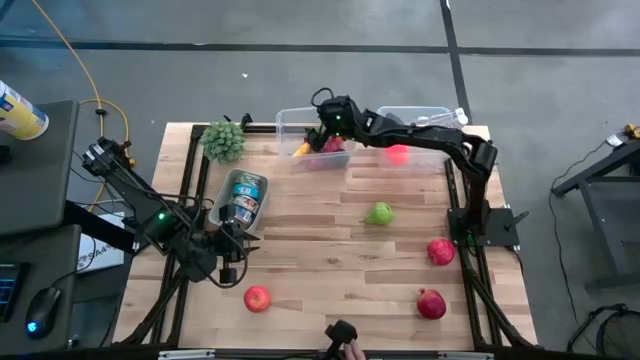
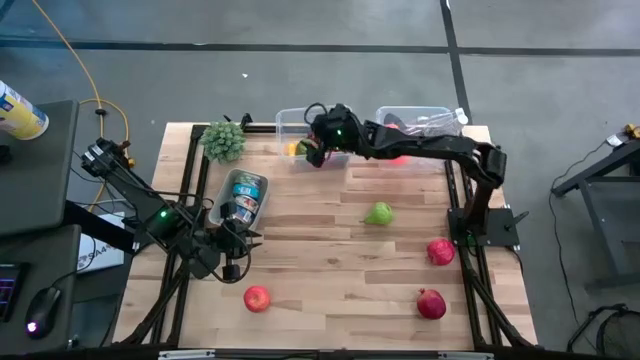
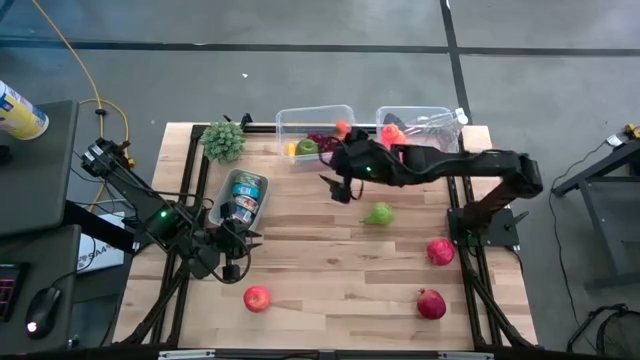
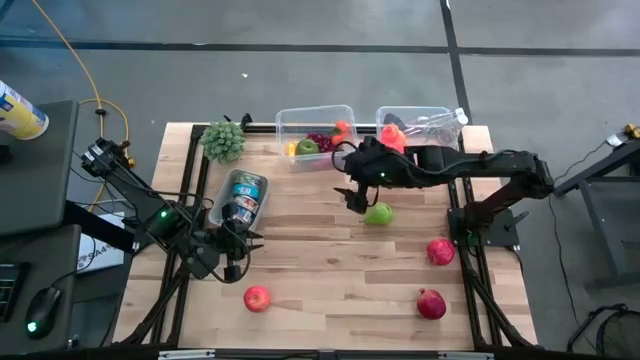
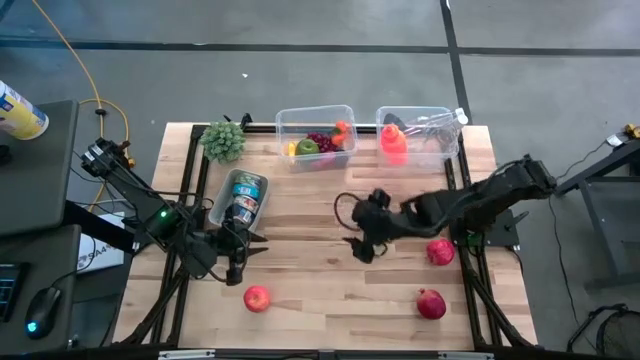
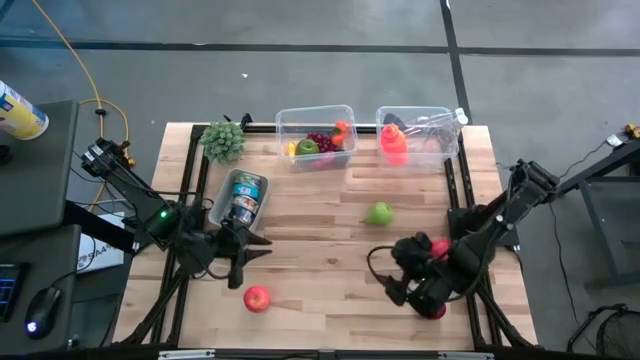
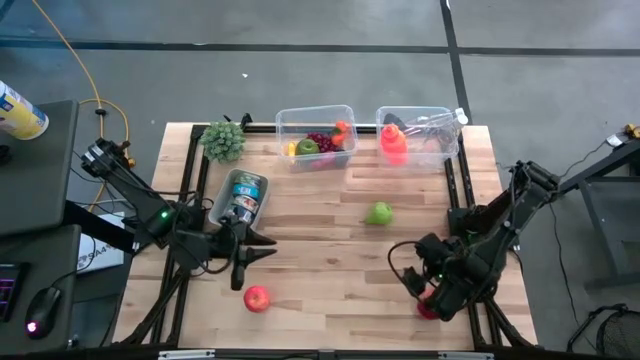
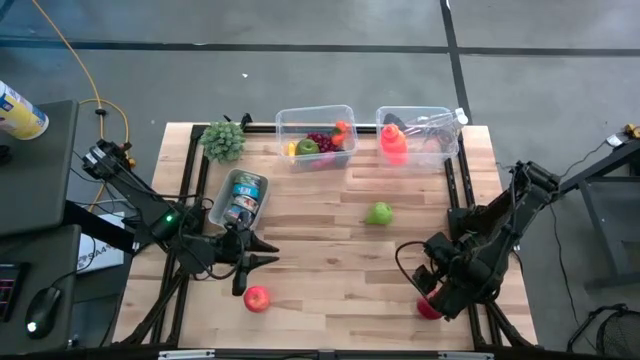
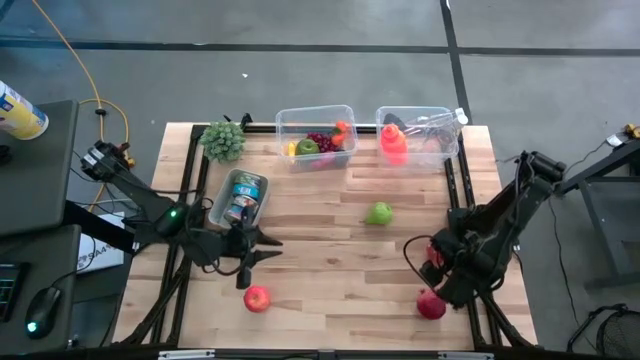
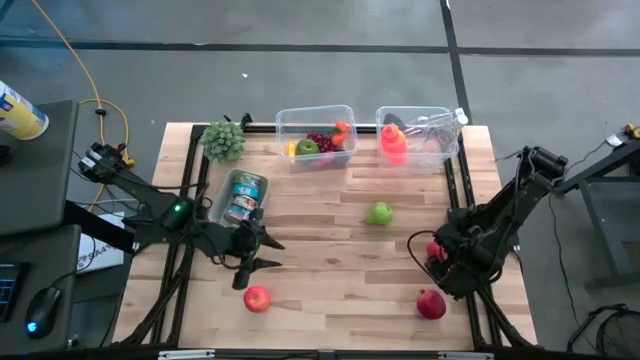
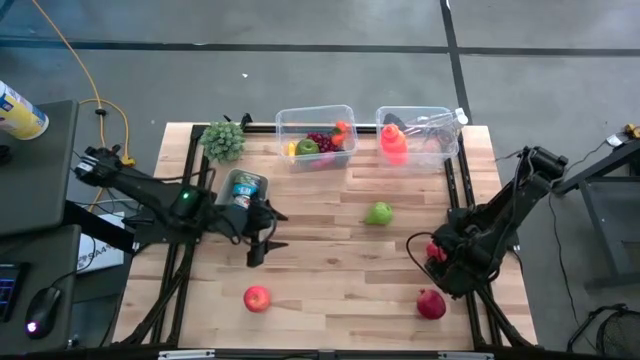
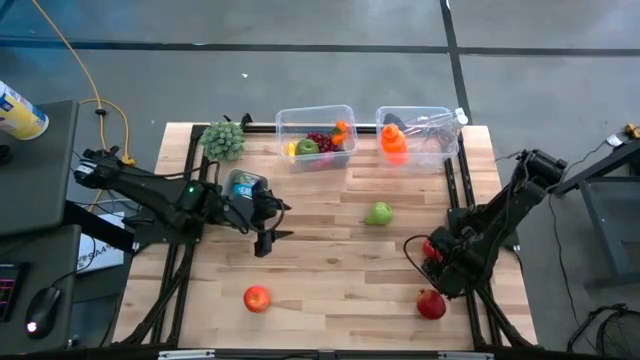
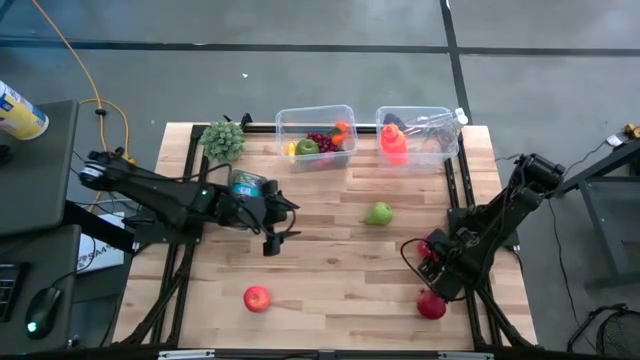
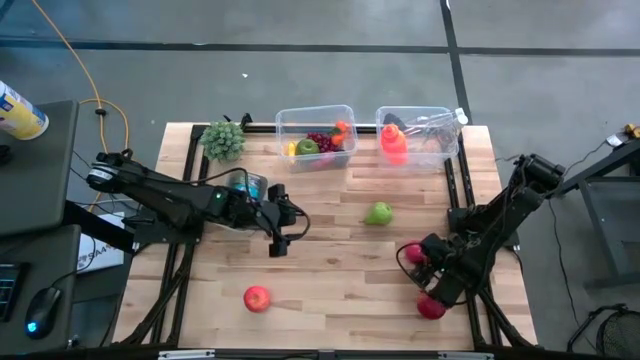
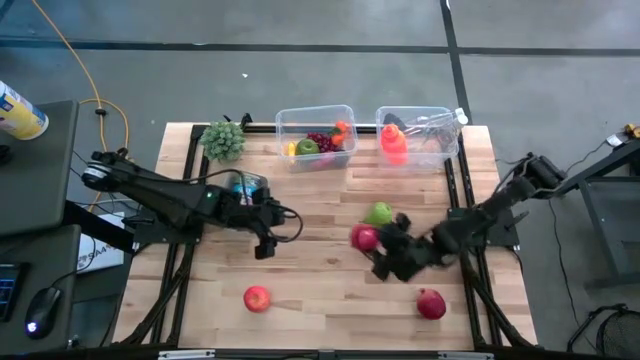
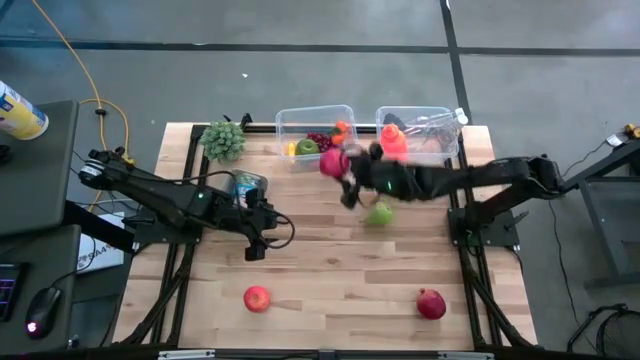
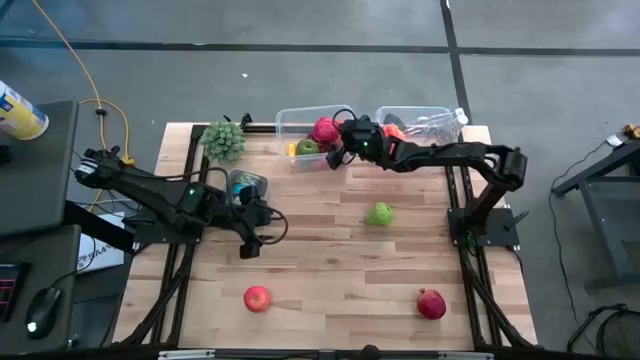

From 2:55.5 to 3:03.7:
Task: Pick & Place Food Item
Put the red apple into the left transparent bin

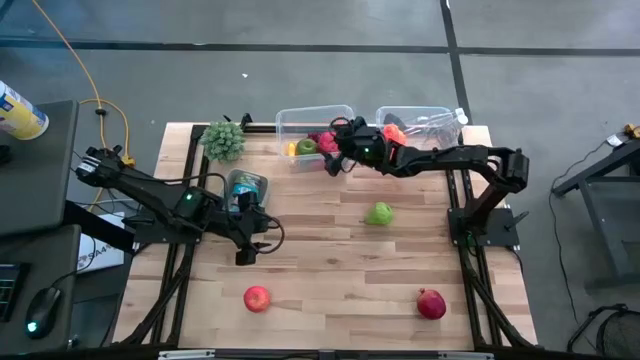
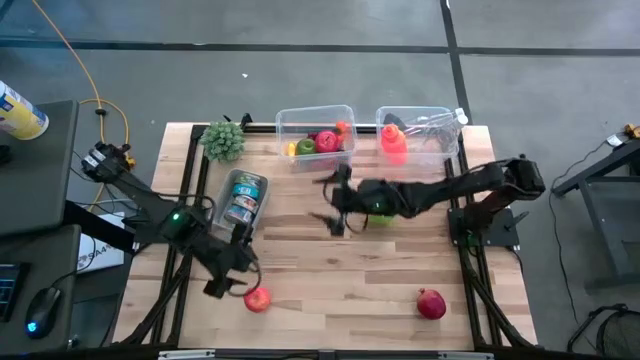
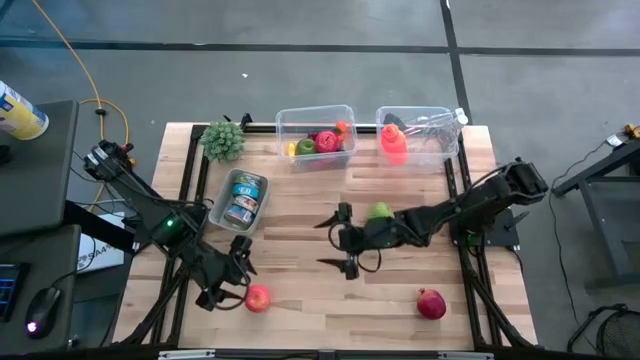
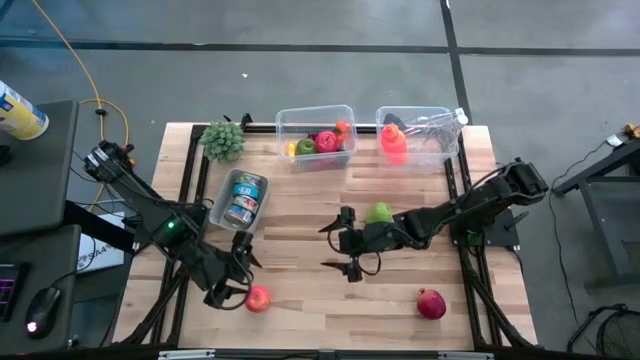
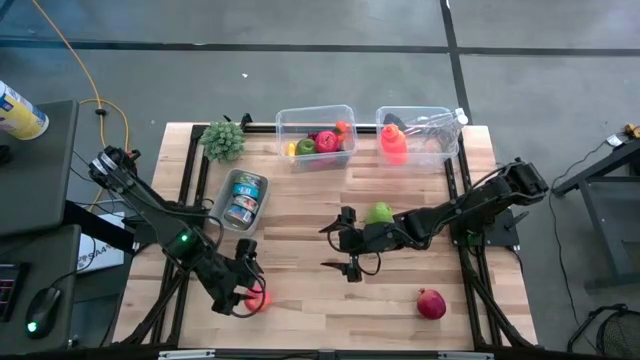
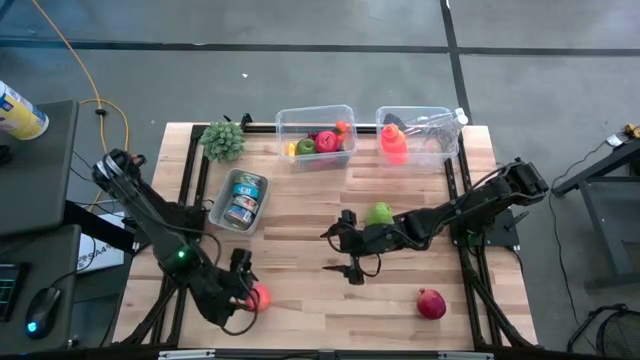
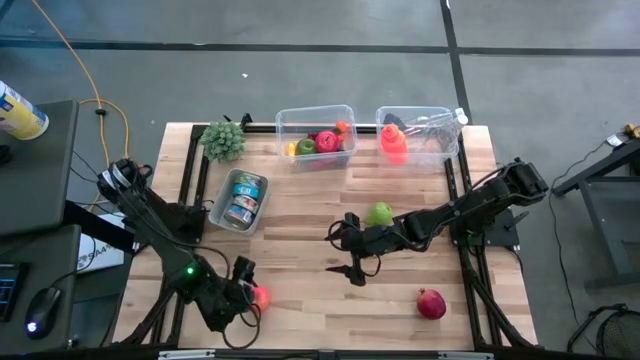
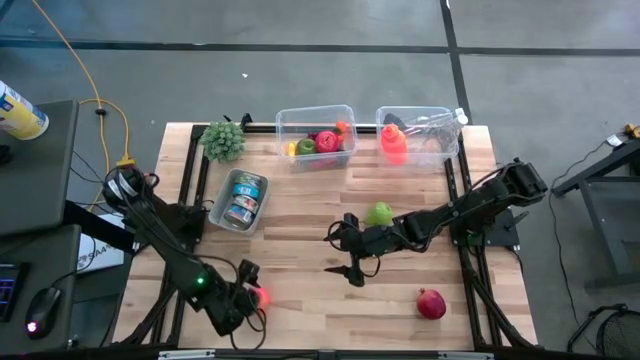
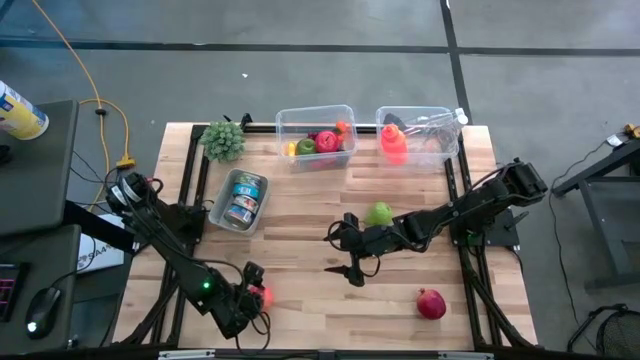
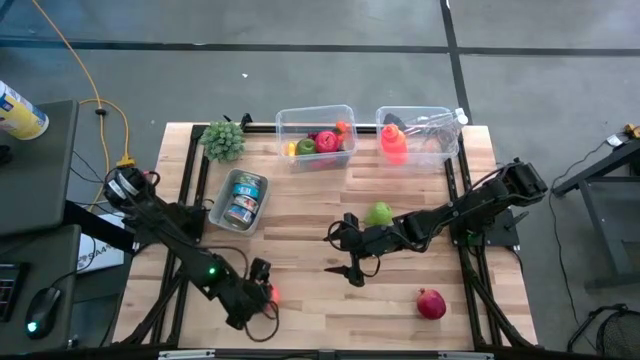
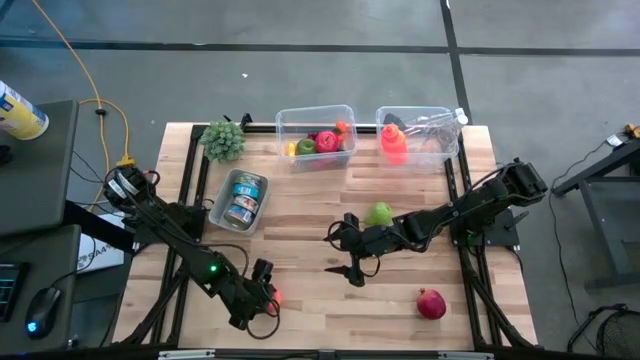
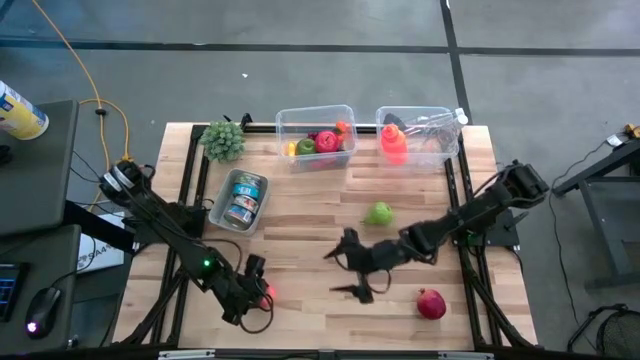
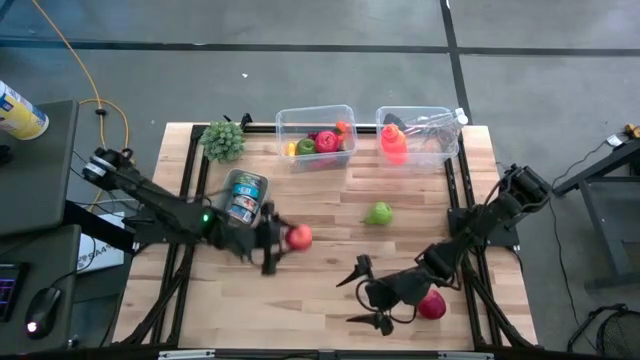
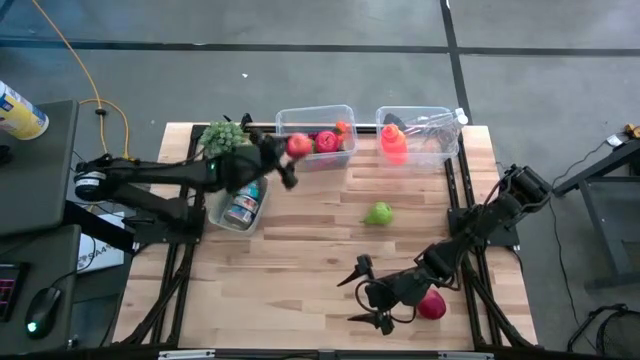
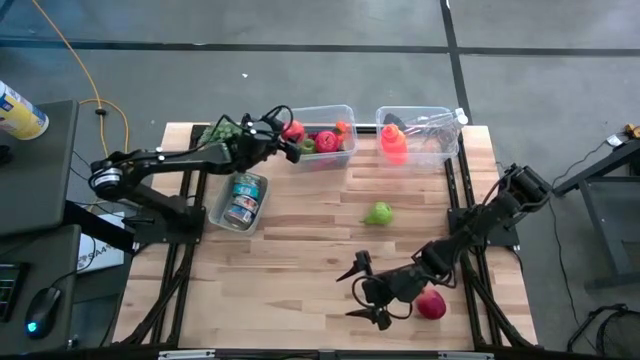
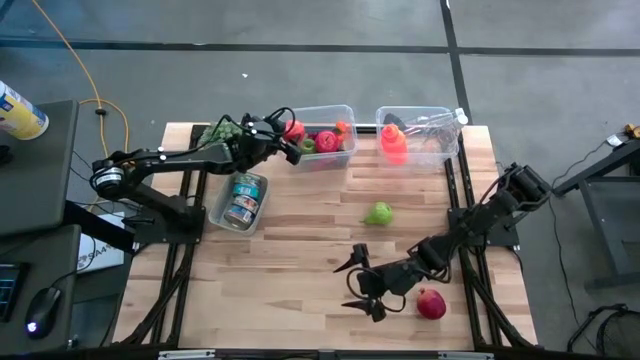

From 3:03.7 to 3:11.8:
Put the red apple into the left transparent bin

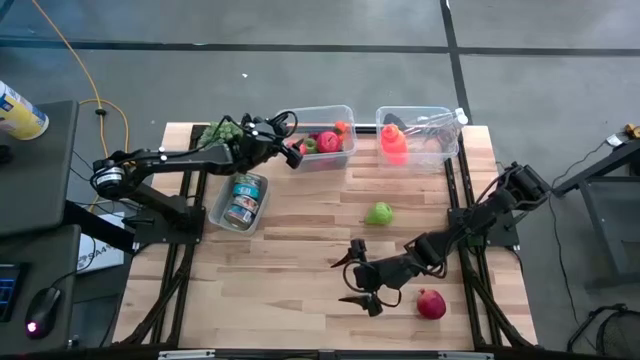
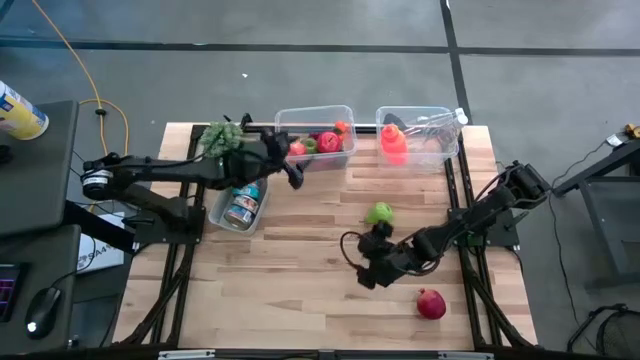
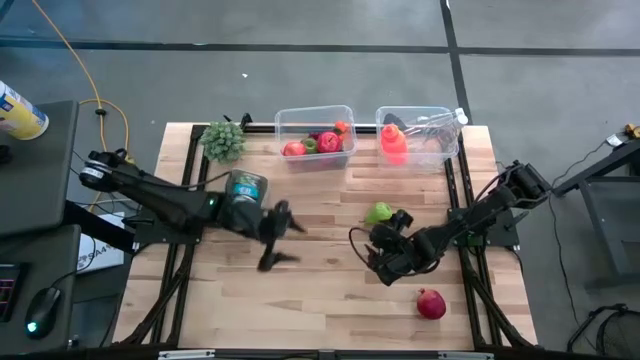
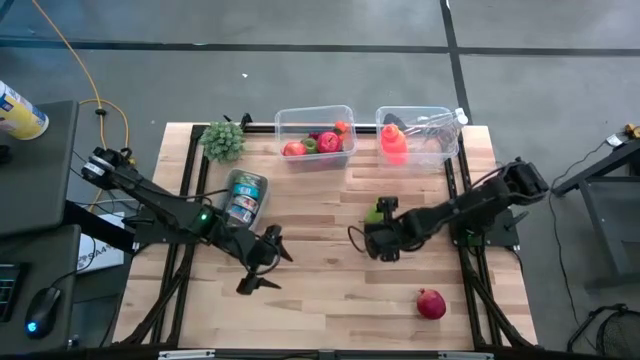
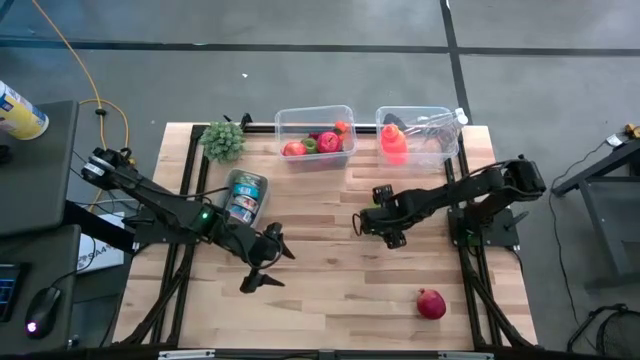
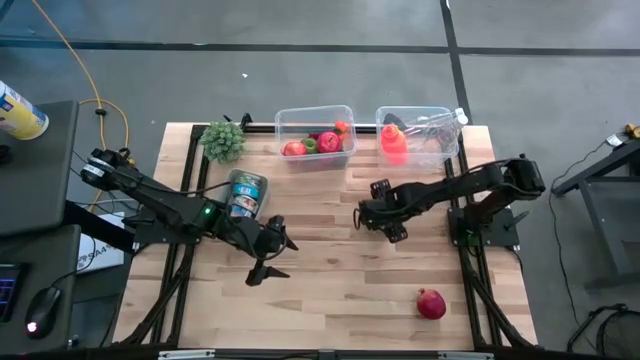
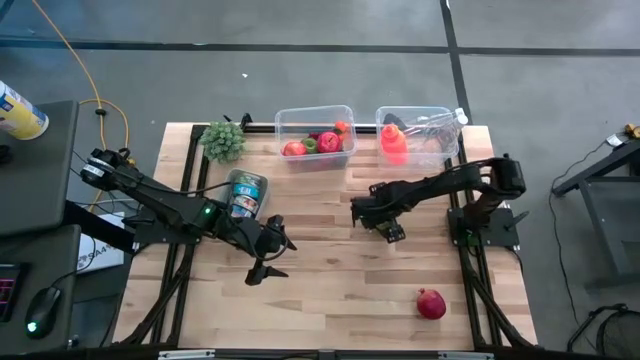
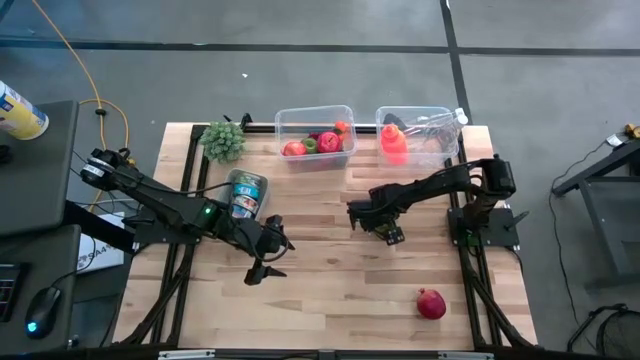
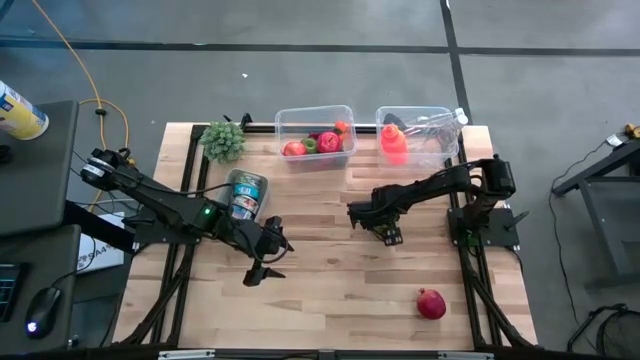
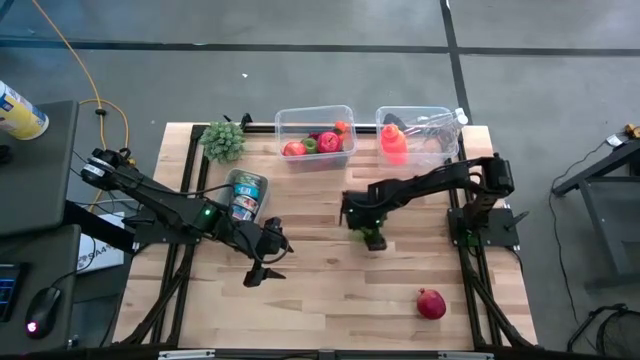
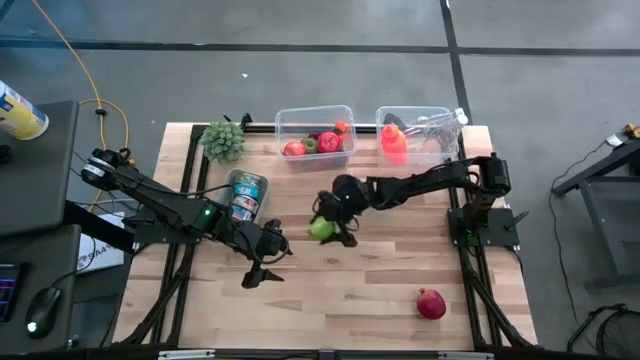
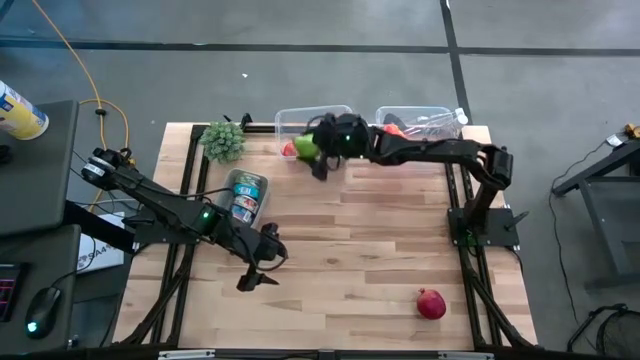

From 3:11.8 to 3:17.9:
Put the green pear into left transparent bin
